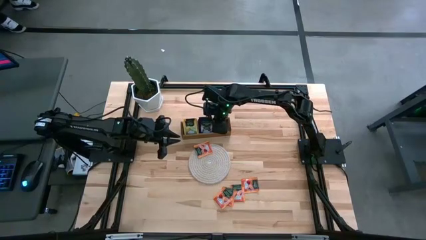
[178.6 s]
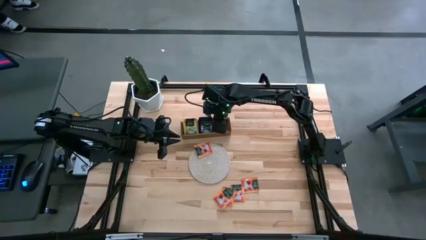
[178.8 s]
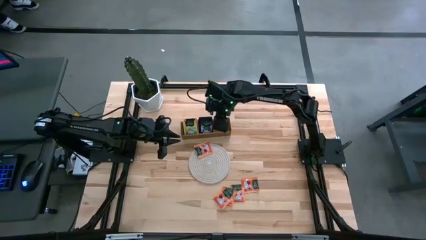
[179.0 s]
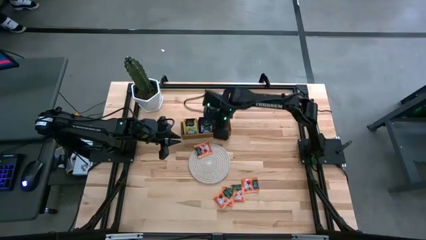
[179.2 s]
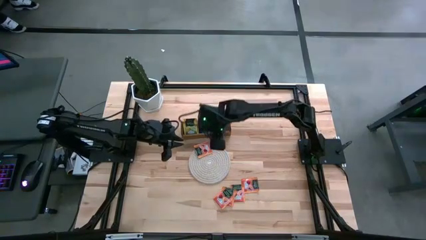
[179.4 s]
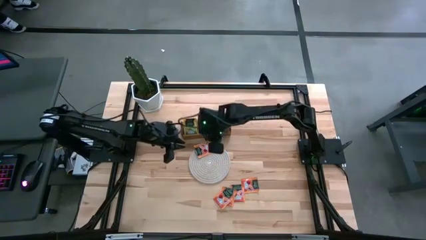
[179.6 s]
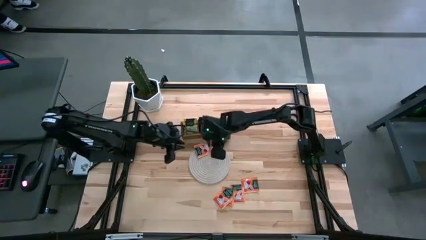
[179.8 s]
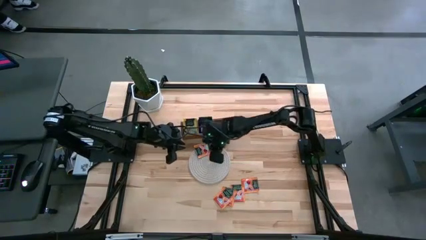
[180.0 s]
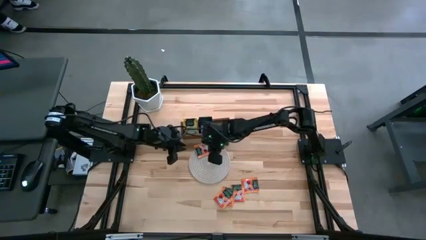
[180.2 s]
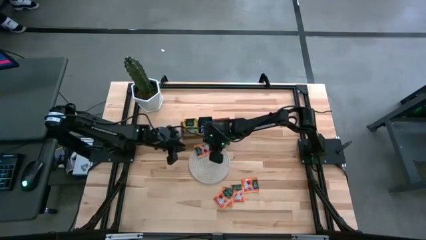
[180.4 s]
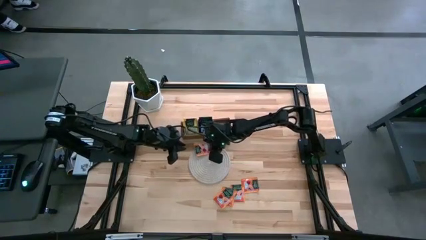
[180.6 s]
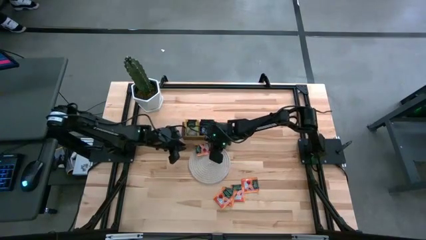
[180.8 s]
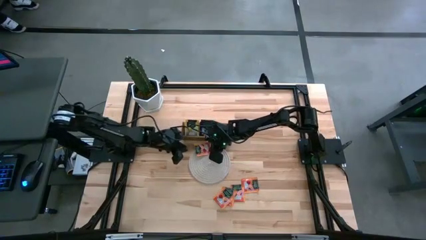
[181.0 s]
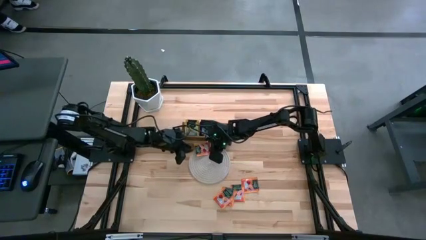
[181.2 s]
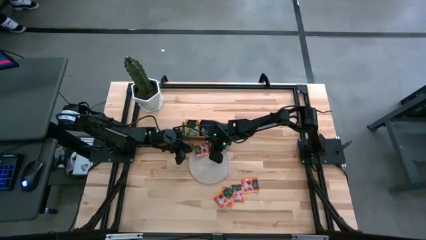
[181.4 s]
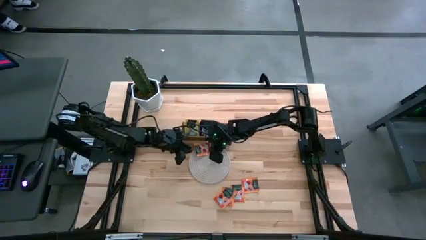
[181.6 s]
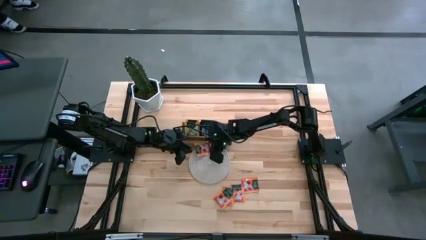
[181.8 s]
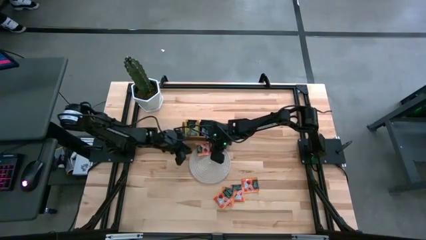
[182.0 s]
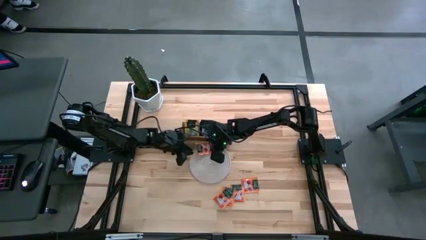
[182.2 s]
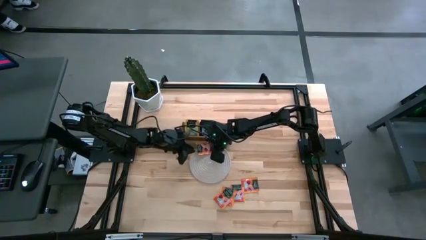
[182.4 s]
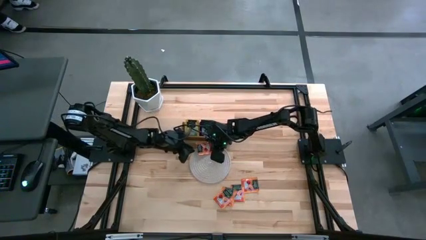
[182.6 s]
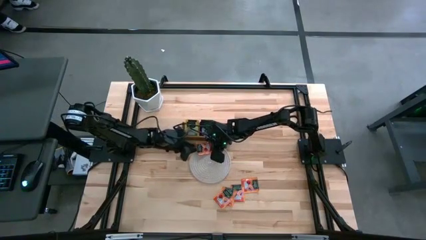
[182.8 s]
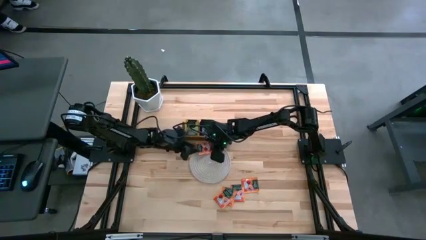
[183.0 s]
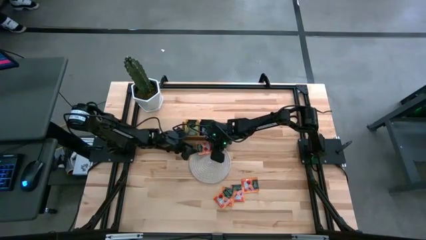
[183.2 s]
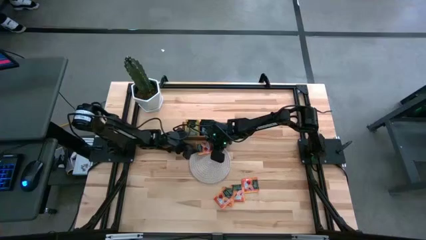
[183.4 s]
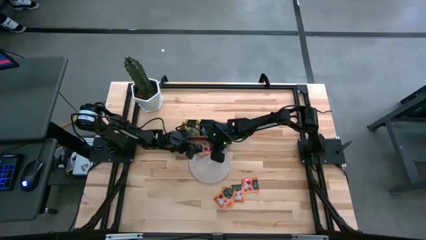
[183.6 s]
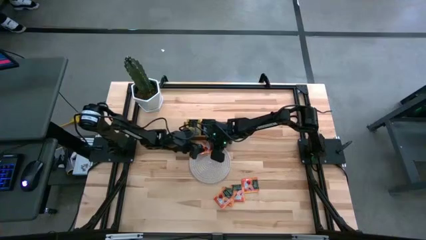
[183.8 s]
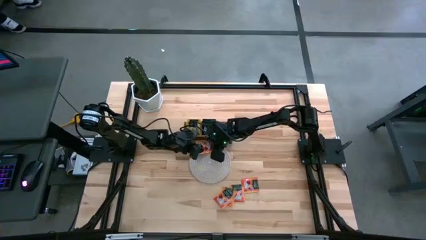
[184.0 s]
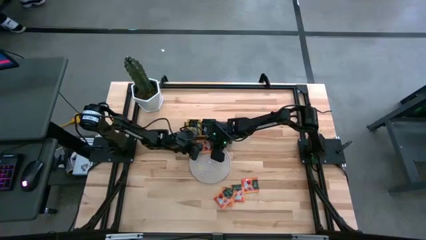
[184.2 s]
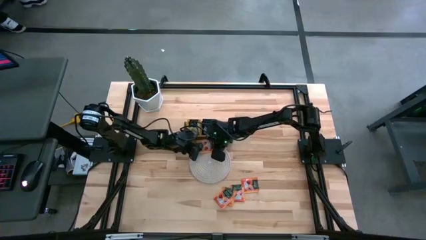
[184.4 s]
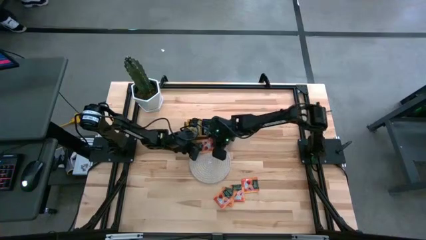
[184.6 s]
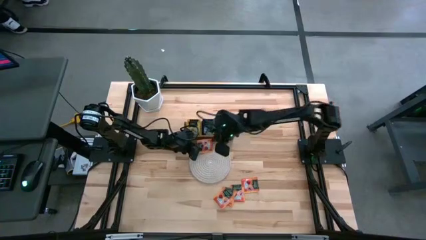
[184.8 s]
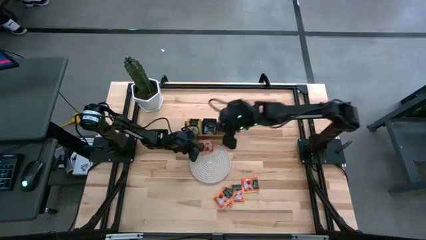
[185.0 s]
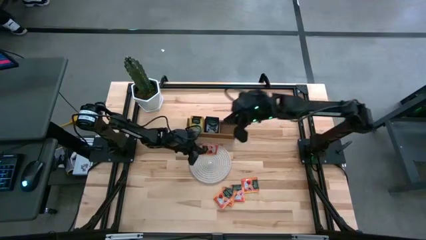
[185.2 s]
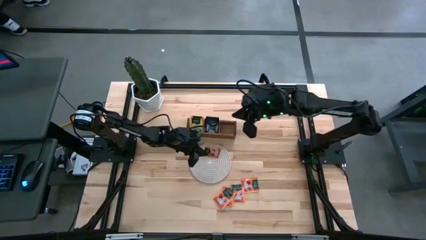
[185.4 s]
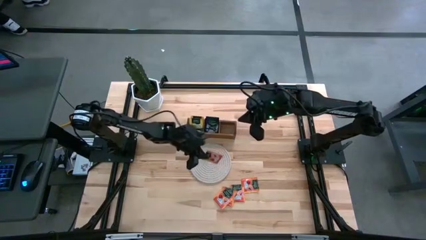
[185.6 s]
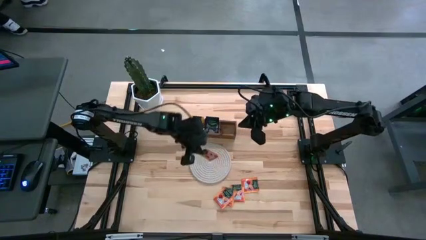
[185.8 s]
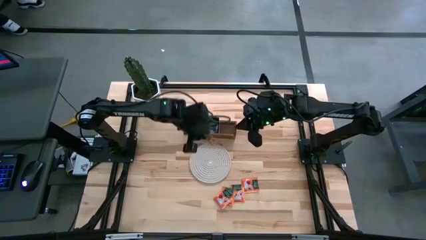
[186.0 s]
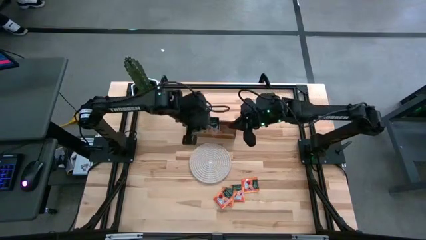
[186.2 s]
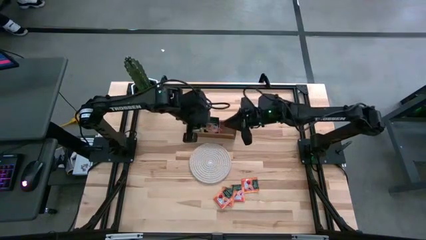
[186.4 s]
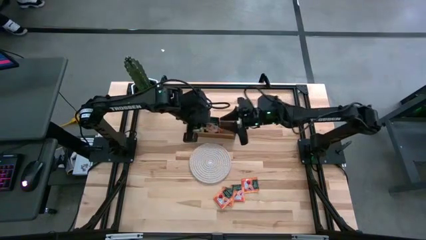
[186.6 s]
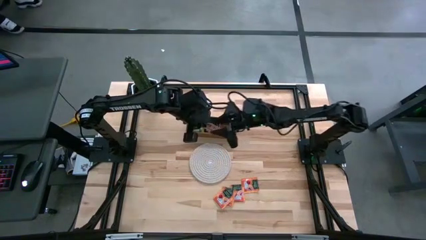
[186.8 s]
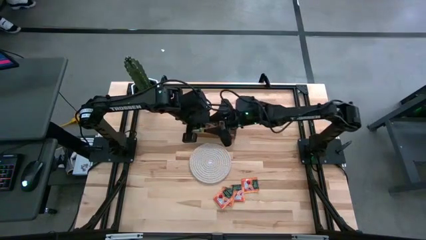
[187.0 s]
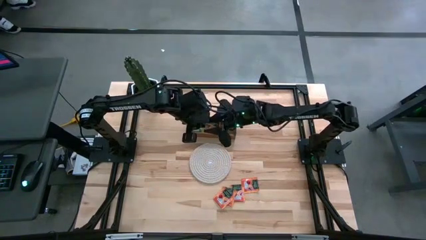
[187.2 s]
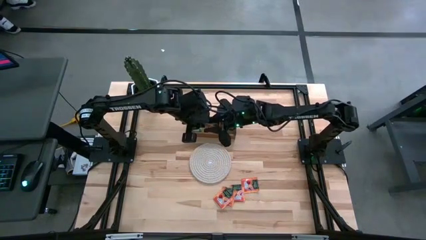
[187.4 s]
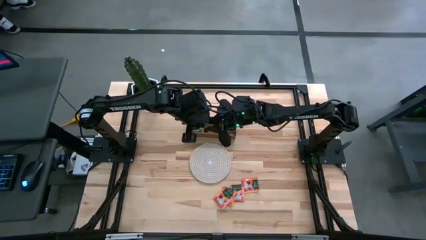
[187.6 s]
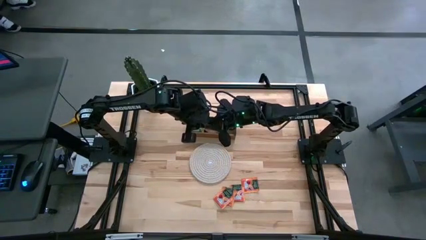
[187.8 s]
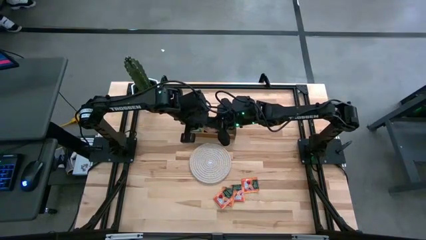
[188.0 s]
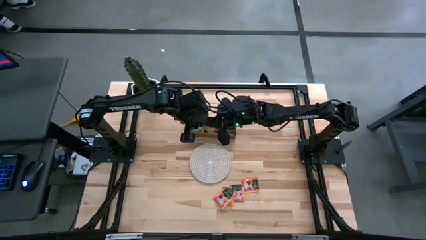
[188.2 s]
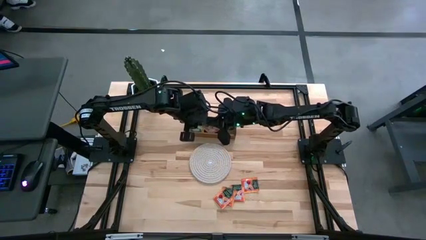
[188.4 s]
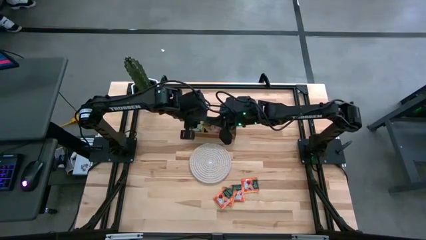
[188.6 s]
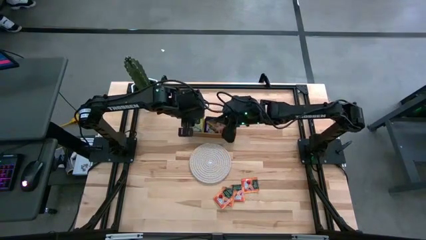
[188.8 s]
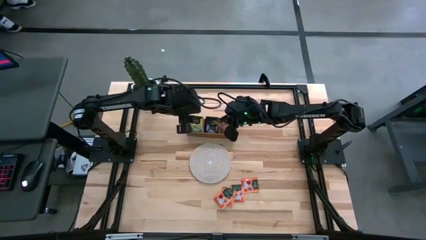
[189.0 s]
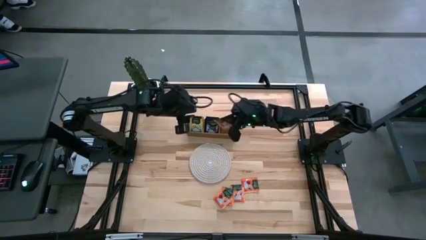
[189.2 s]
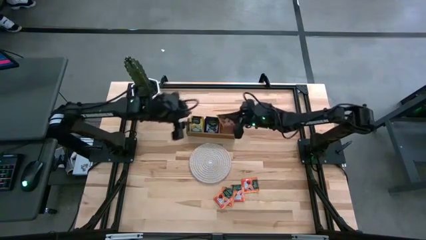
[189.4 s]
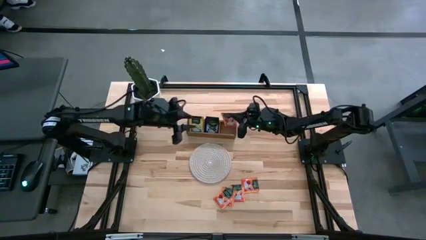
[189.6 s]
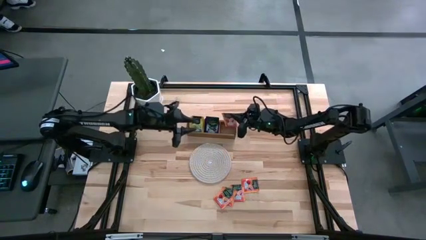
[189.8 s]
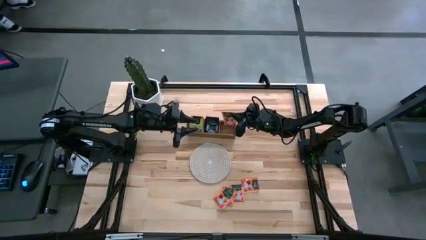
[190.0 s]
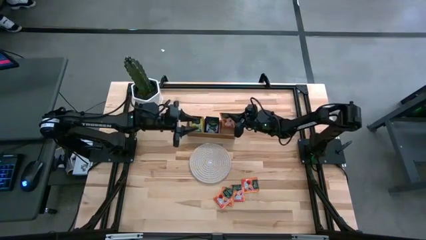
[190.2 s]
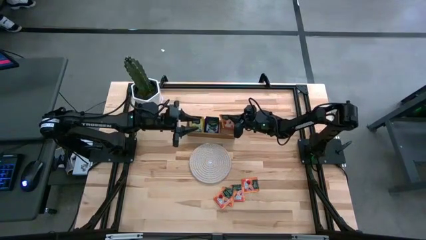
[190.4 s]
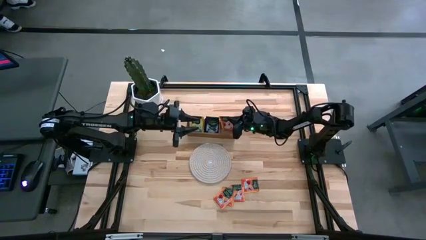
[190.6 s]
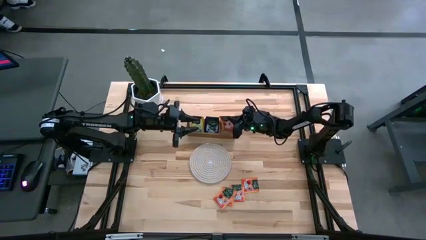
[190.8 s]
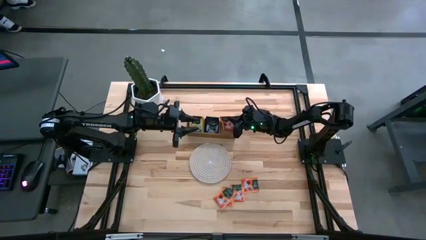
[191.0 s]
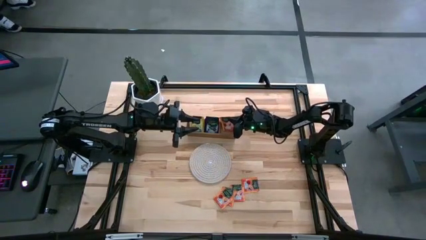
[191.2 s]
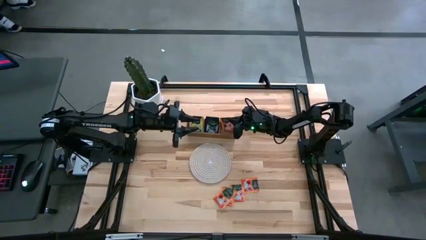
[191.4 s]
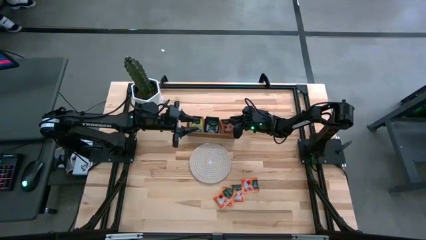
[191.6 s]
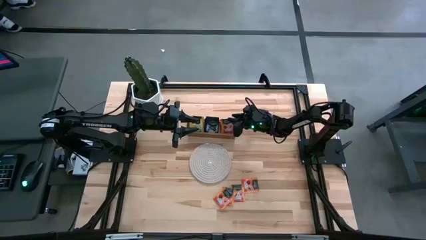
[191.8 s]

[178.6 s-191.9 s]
Task: Pick & Place Tea
Put the orange tea bag into the right section of the wooden organizer

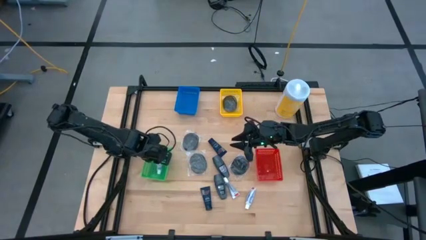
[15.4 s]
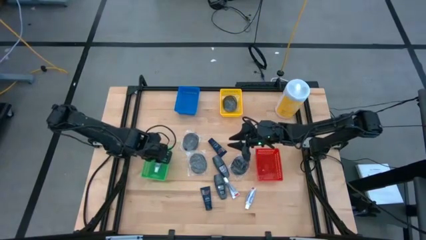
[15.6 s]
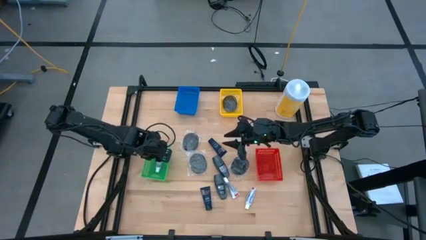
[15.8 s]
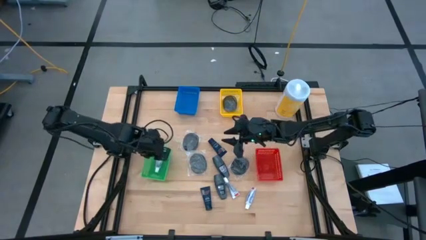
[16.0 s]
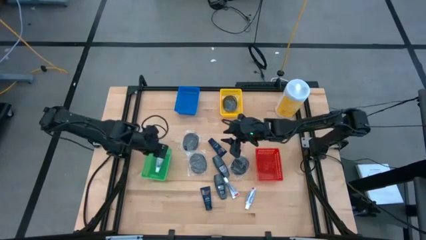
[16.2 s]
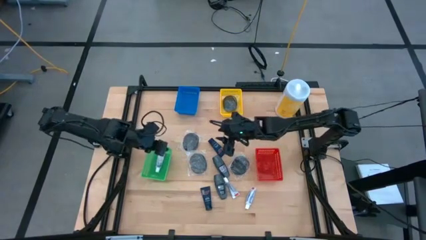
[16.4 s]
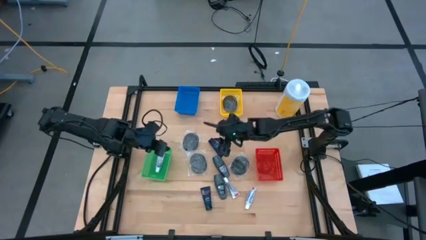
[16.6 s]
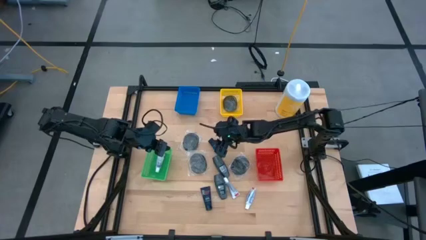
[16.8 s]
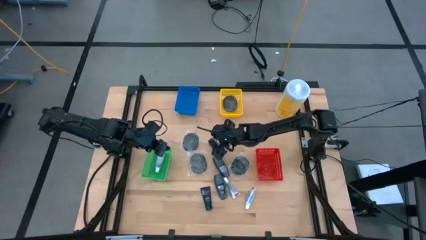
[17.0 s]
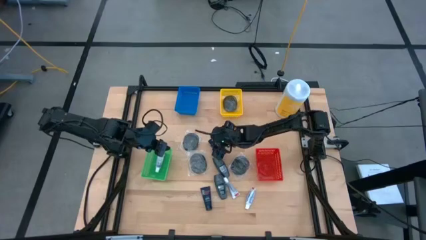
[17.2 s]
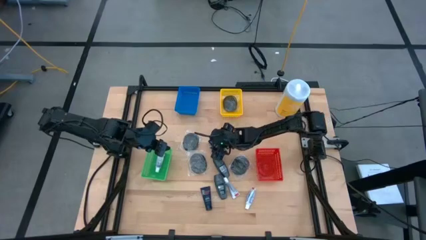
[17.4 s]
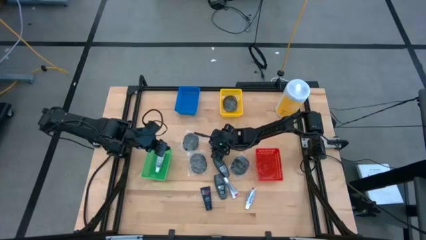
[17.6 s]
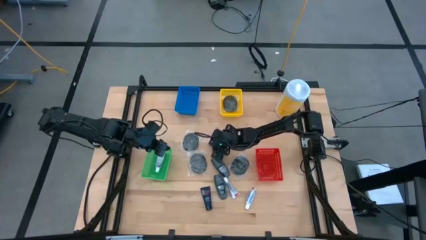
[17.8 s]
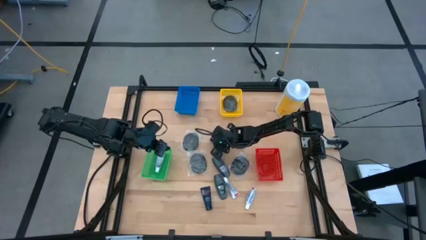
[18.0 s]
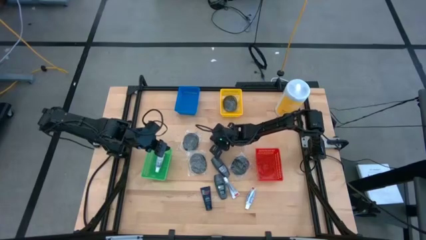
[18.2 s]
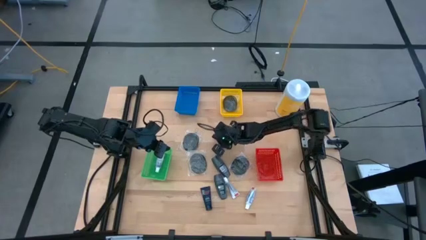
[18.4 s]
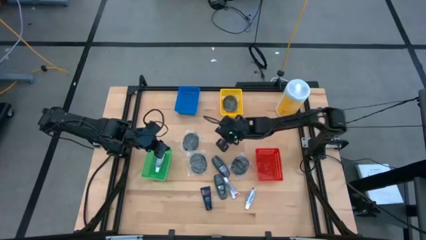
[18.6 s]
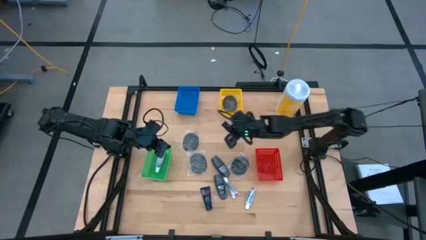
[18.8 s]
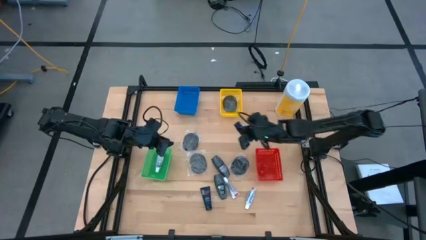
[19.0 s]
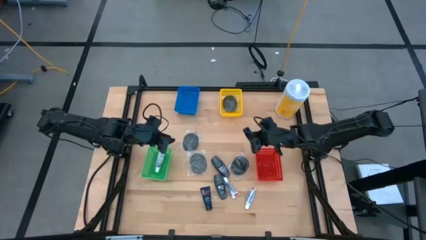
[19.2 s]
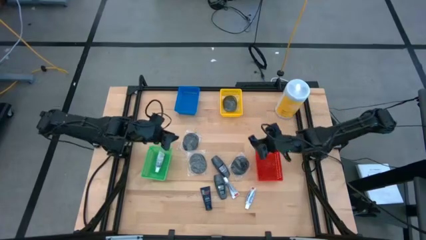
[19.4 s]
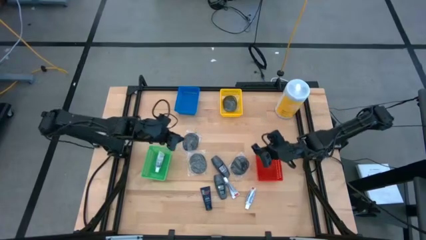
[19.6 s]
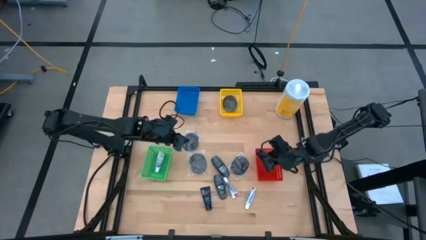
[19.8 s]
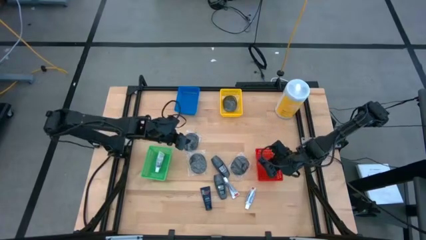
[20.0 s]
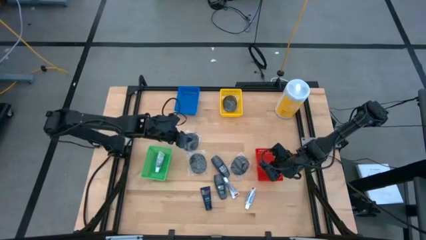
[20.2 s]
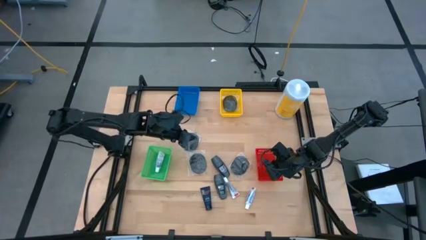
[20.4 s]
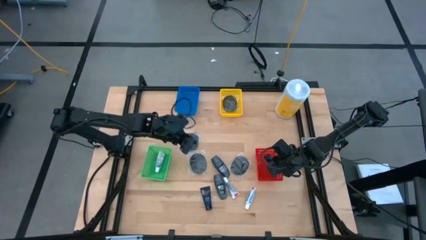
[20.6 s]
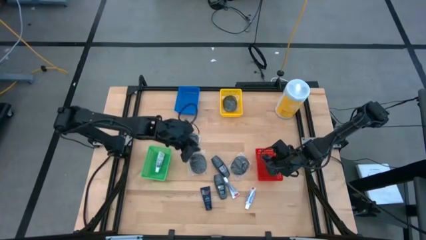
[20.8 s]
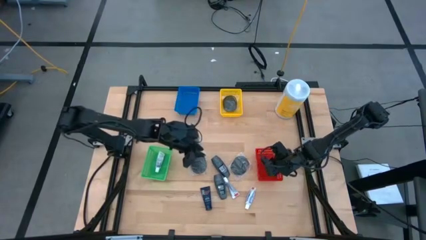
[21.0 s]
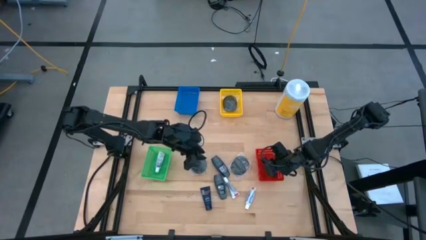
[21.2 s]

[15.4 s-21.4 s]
Task: Pick & Place Travel size toiletries
Put the blue shave cream into the red bin
